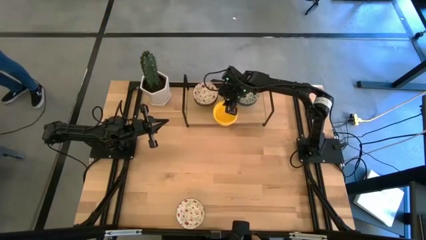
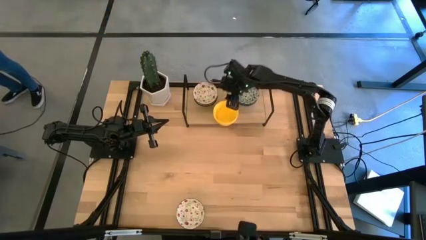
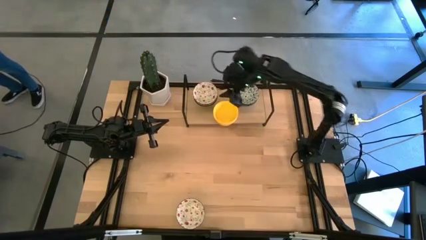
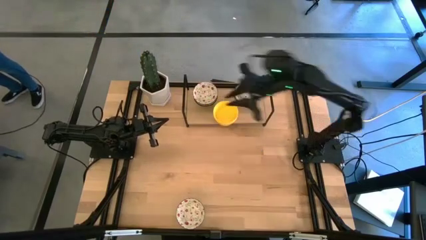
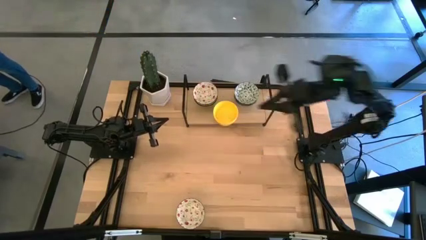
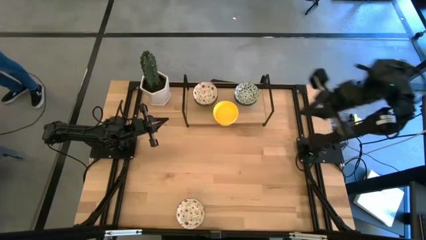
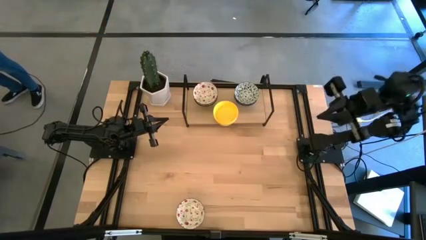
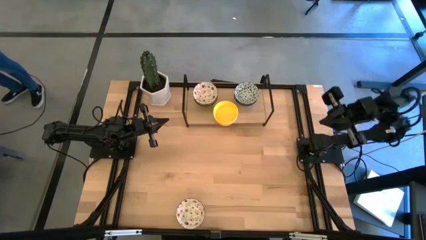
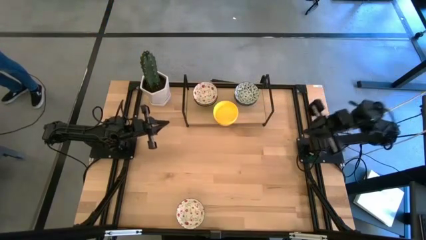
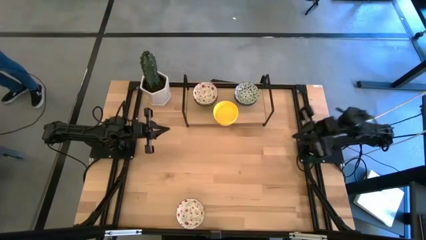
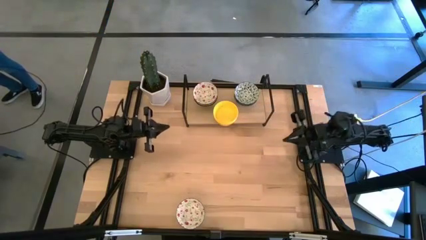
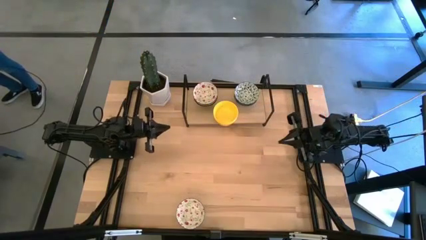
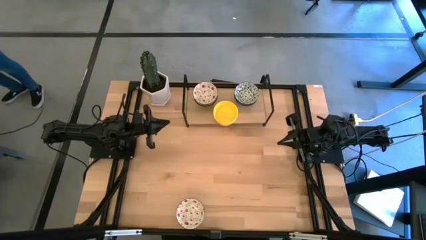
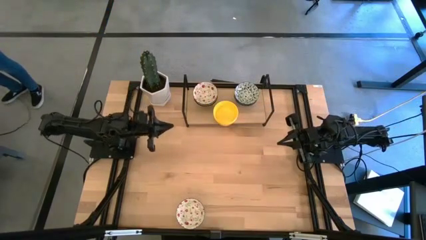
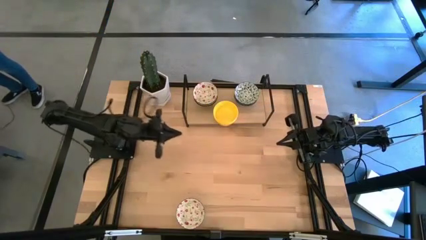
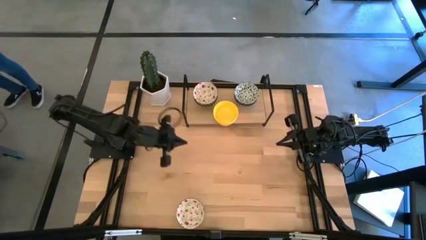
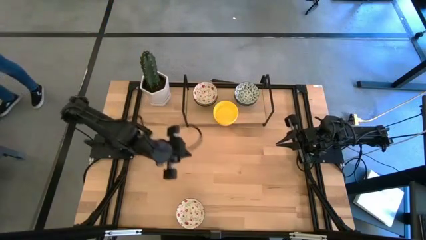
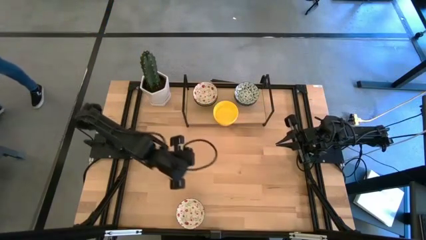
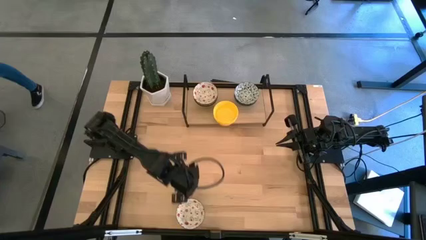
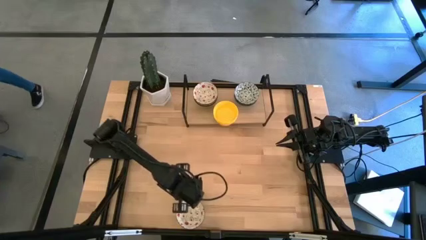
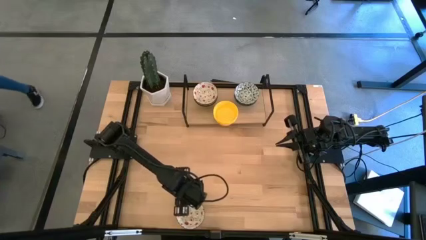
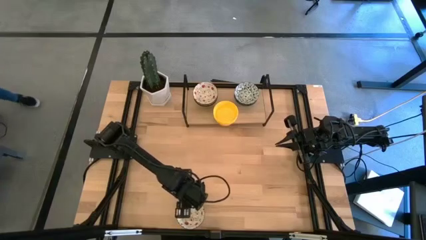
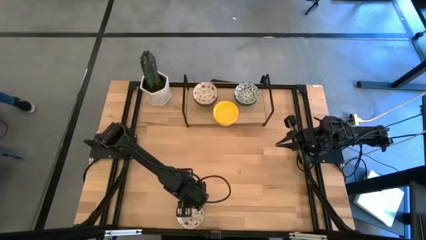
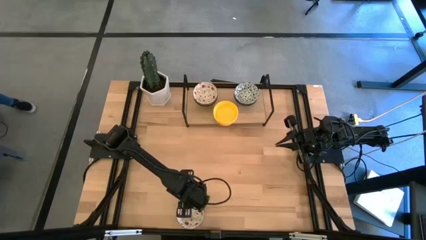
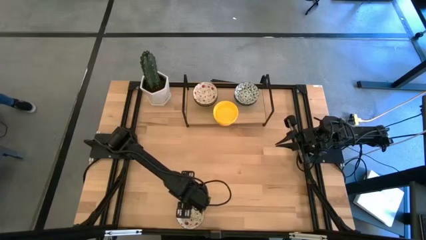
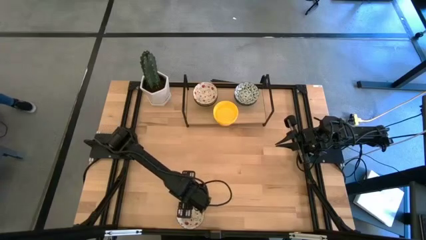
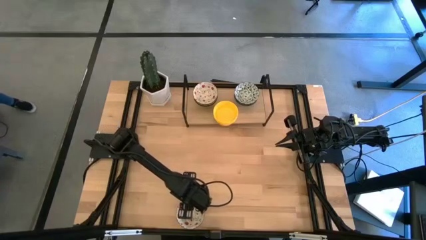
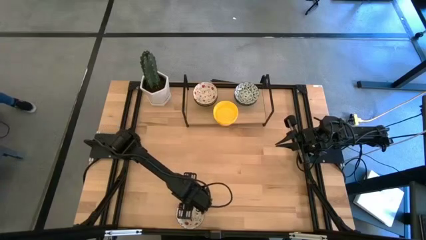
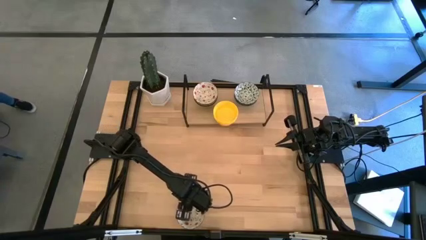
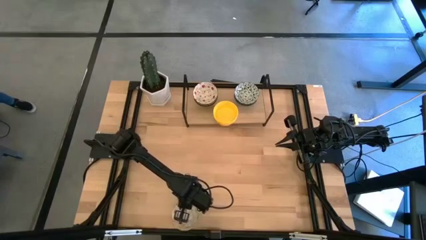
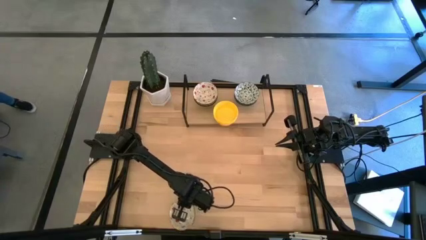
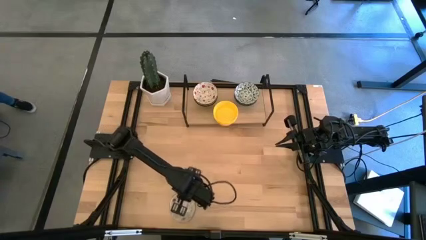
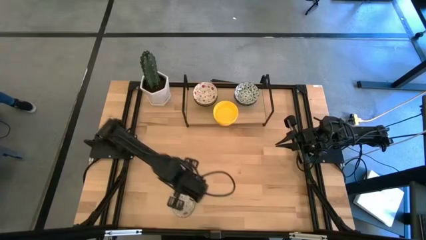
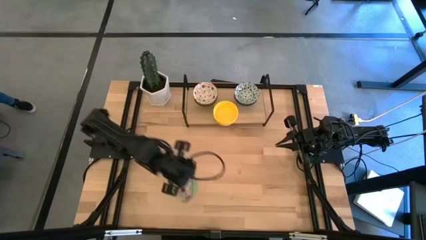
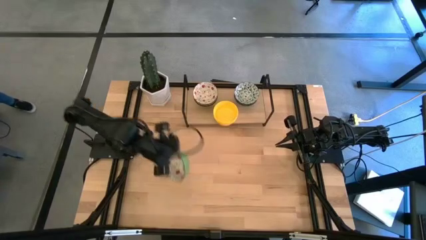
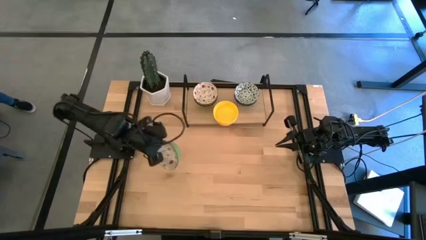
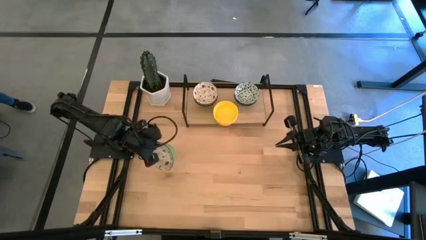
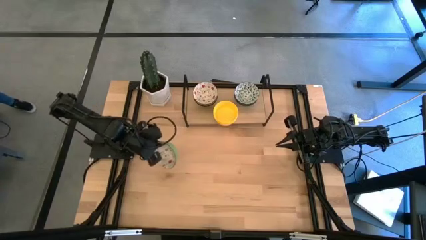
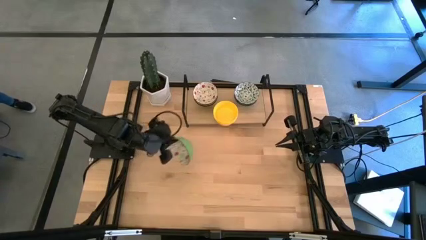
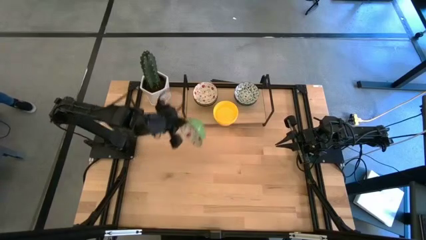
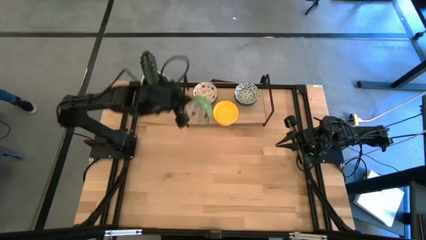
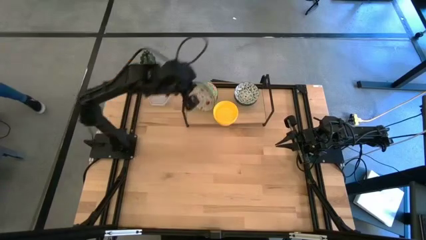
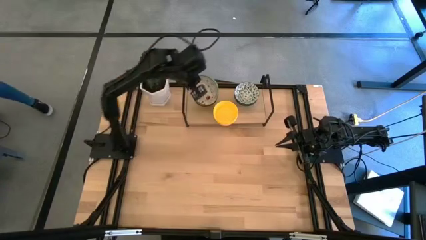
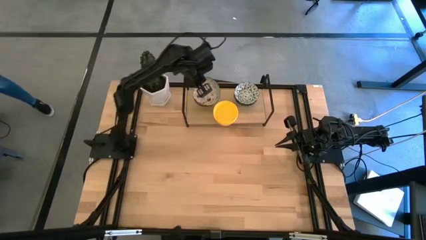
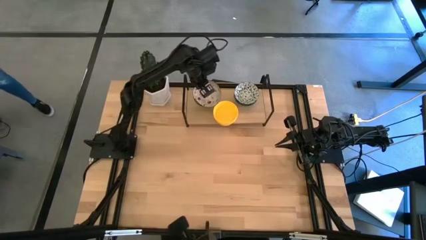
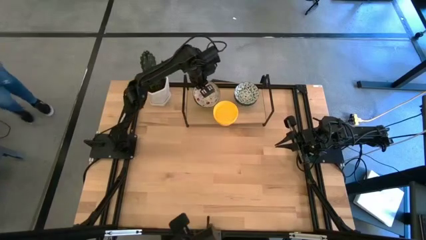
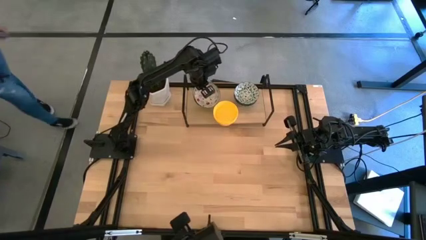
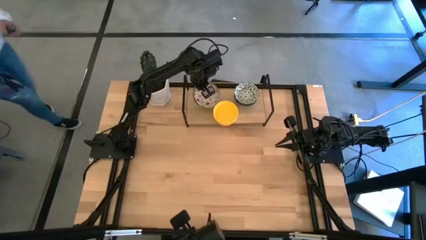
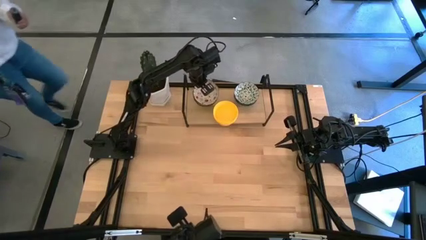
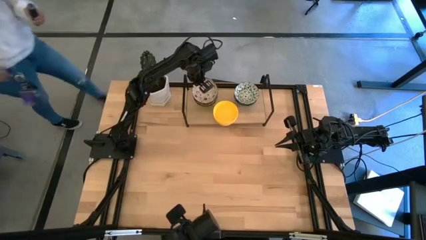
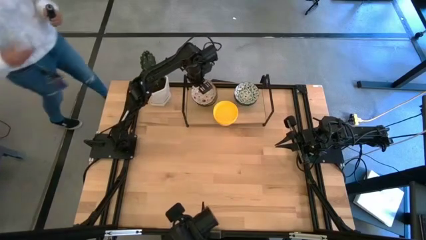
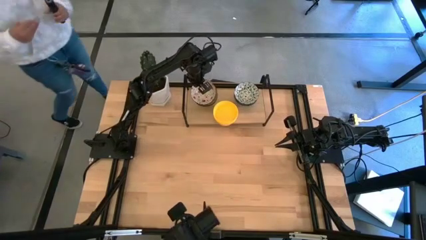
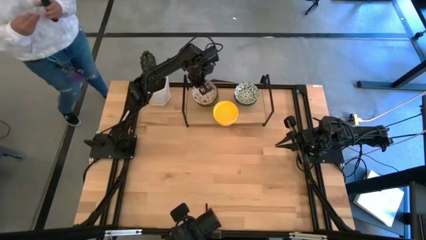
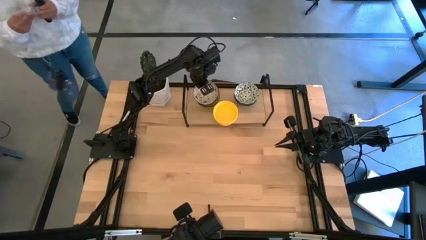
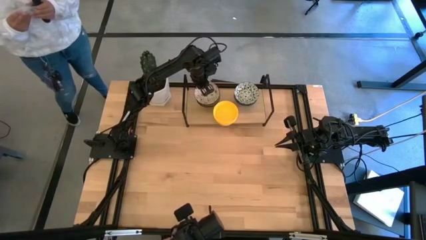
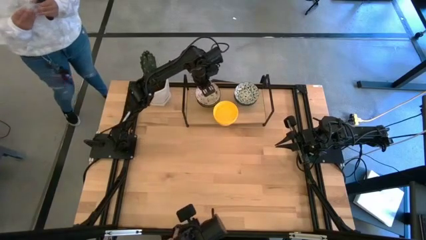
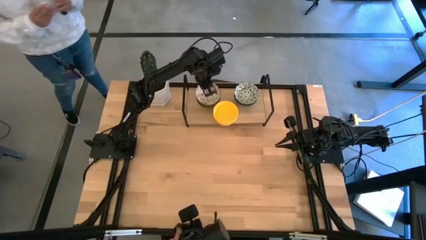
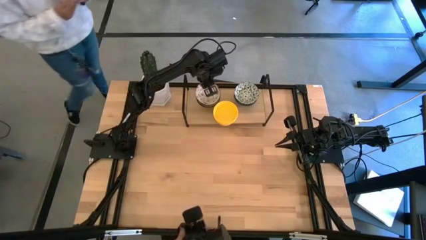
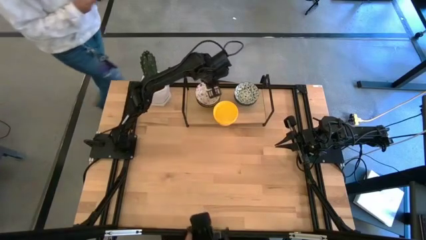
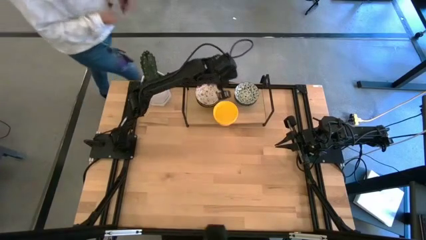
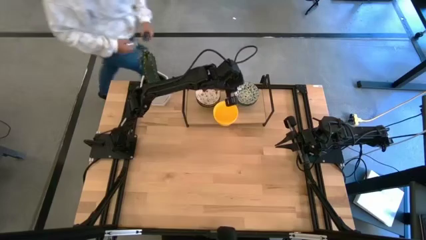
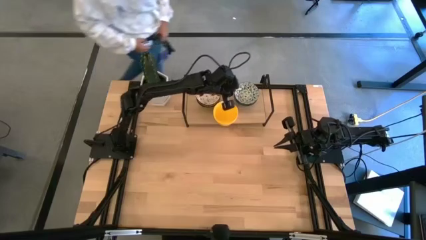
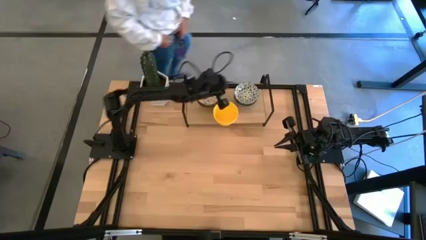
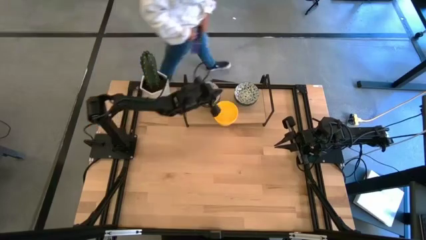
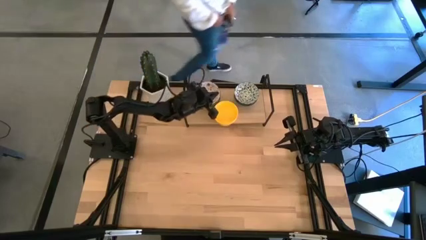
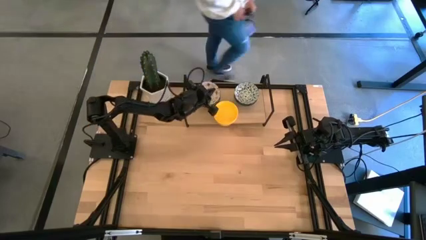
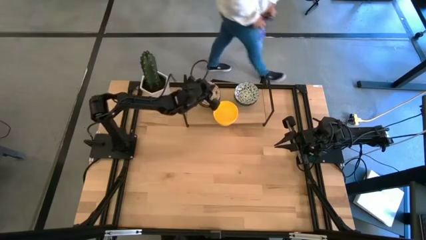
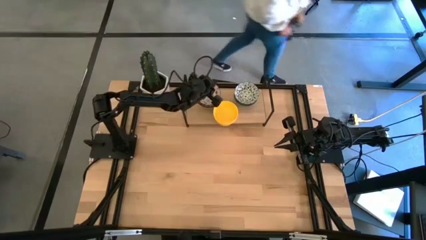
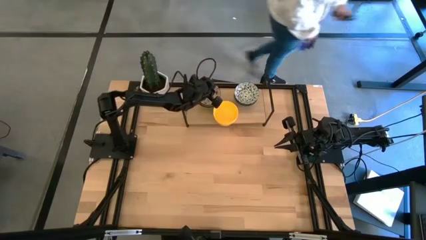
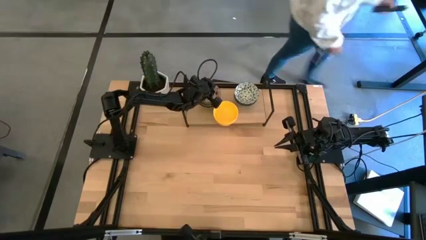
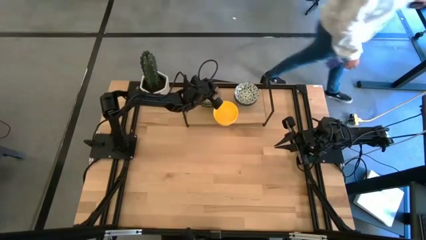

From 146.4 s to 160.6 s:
Task: Pick & Place Mini bowls
Stack the green bowl on top of the green bowls on the shelf

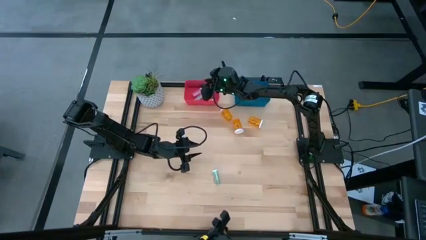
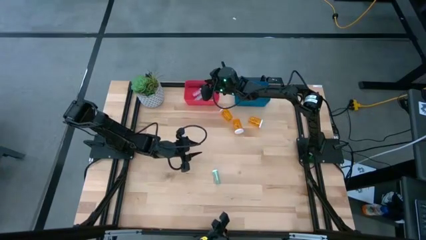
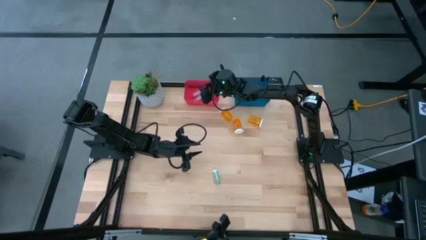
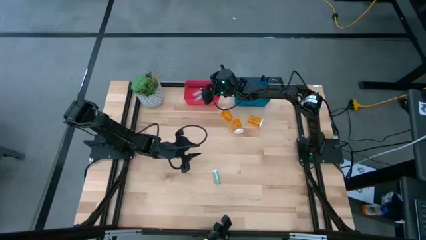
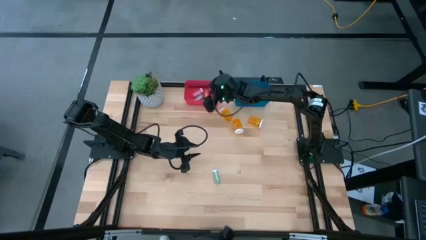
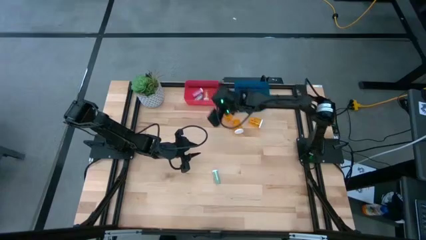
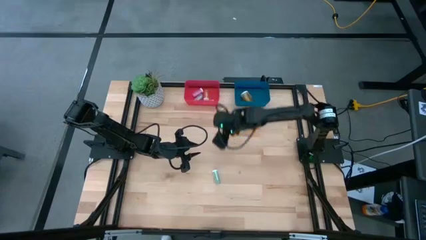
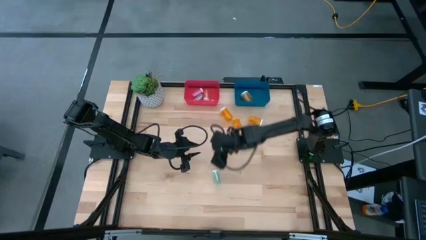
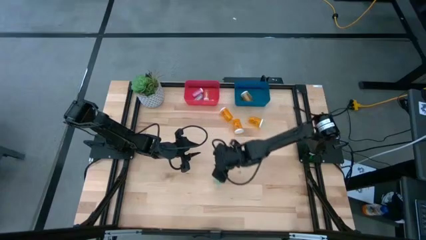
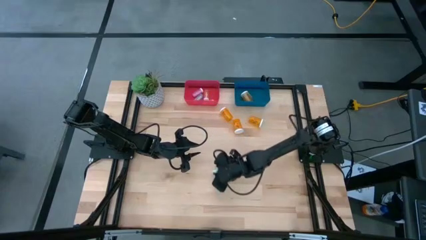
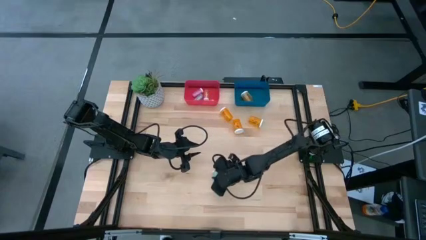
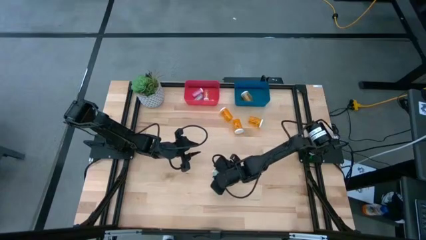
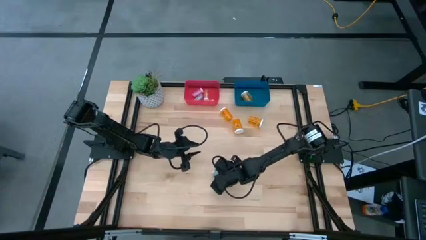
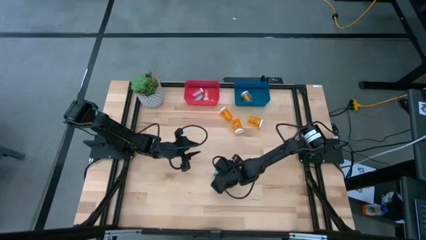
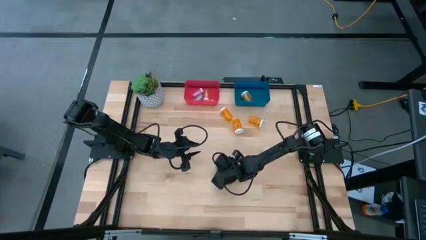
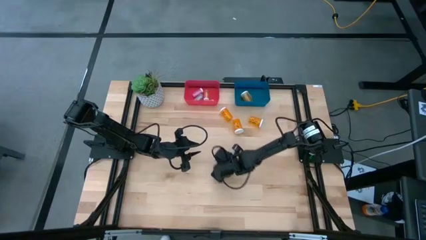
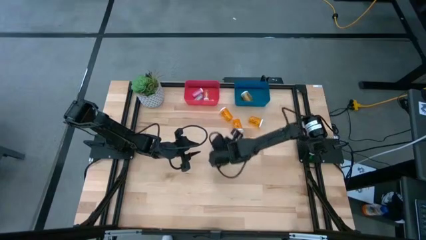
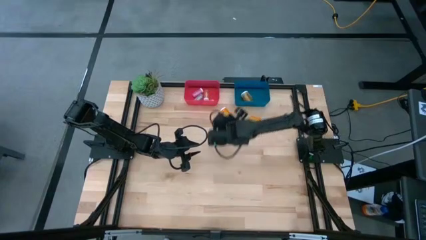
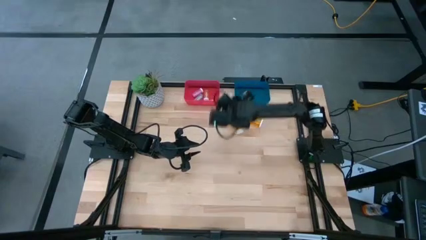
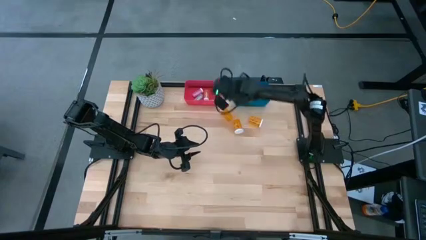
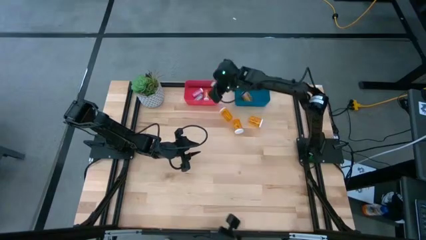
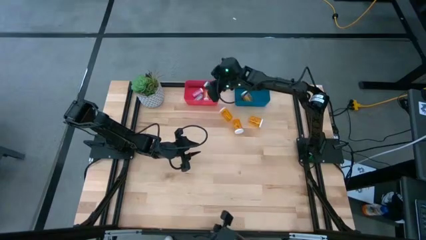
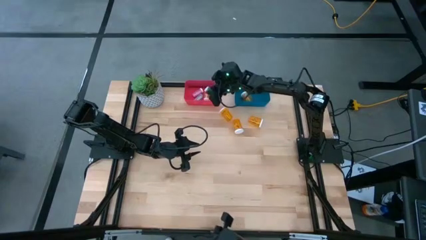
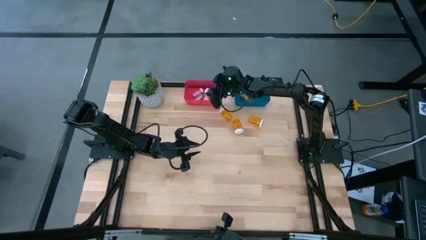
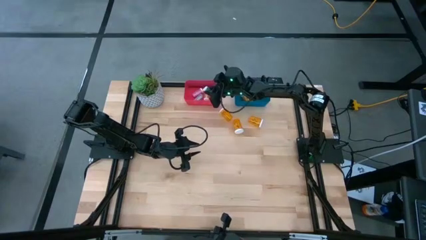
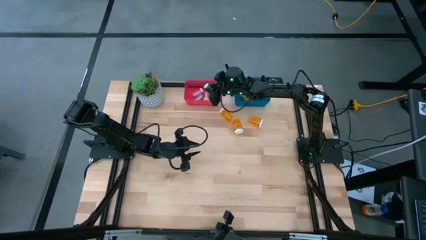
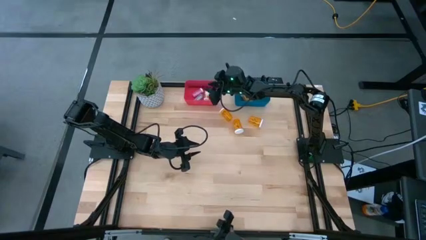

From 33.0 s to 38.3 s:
Task: Pick and place medicine bottles into bin by pill shape (circle, oval)
Put the blue pill bottle into the red bin
